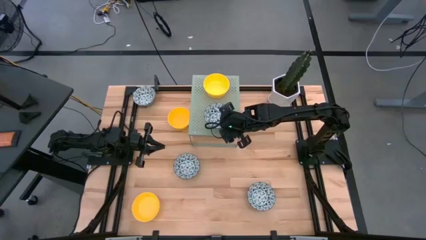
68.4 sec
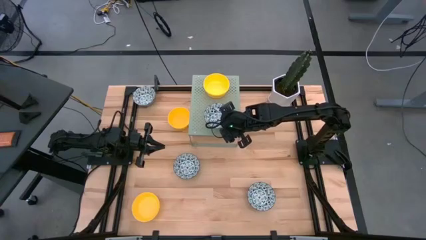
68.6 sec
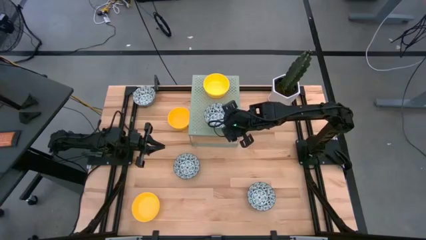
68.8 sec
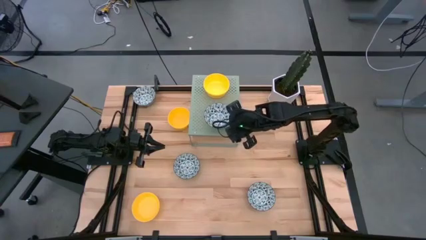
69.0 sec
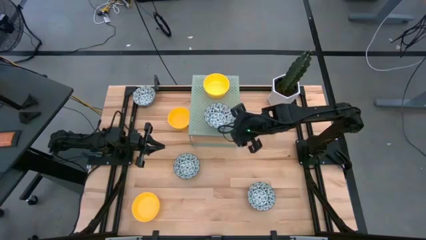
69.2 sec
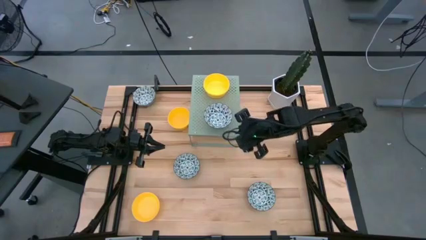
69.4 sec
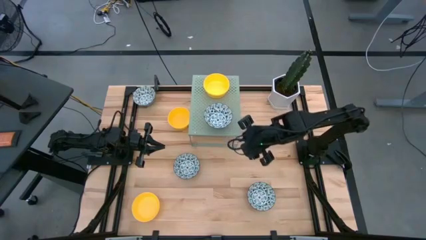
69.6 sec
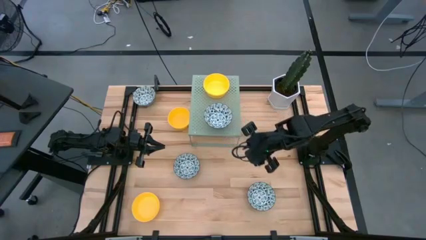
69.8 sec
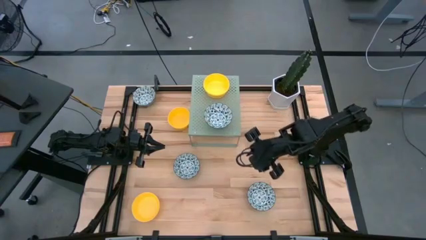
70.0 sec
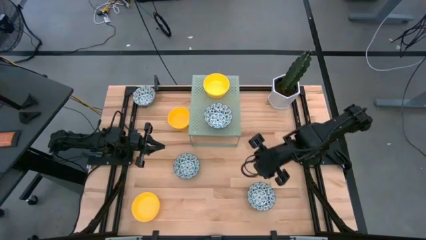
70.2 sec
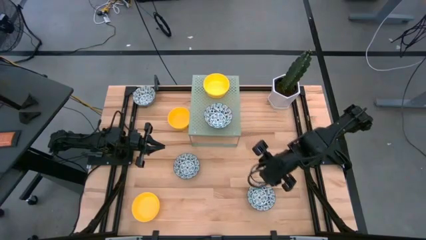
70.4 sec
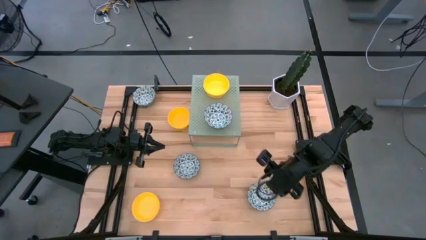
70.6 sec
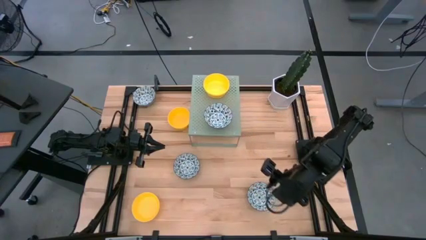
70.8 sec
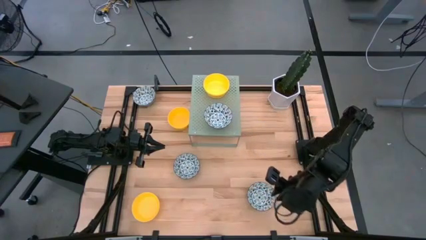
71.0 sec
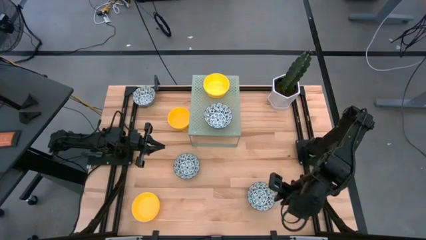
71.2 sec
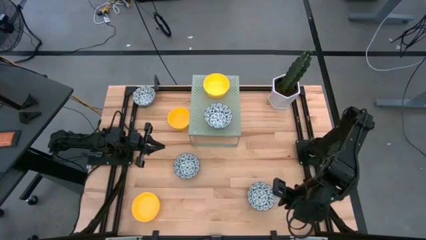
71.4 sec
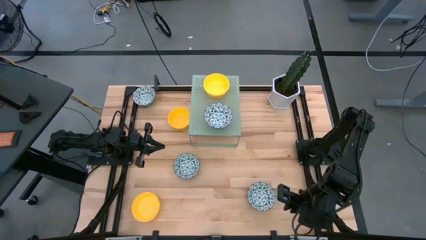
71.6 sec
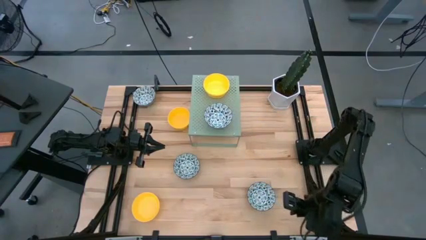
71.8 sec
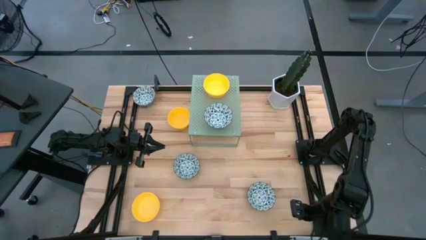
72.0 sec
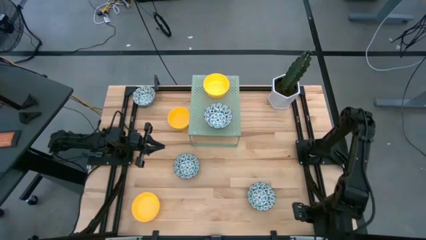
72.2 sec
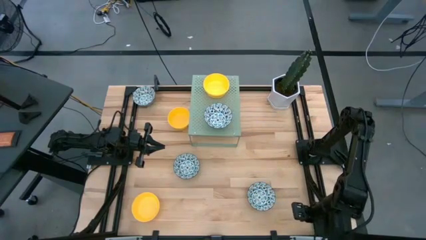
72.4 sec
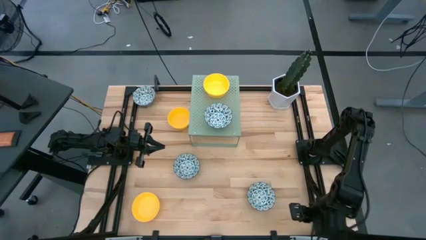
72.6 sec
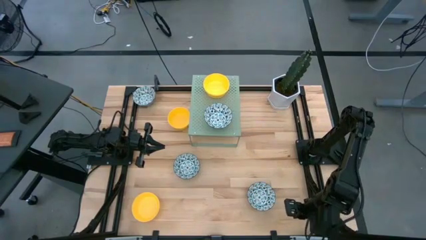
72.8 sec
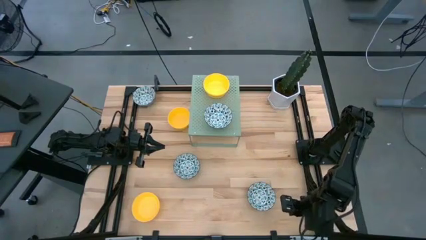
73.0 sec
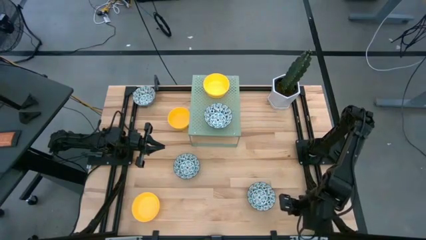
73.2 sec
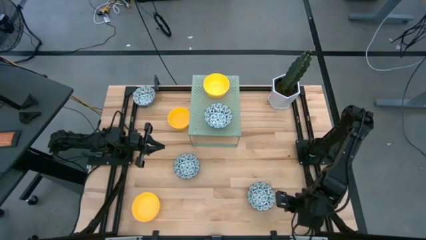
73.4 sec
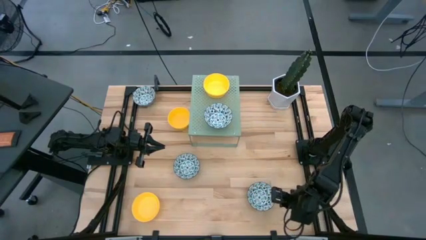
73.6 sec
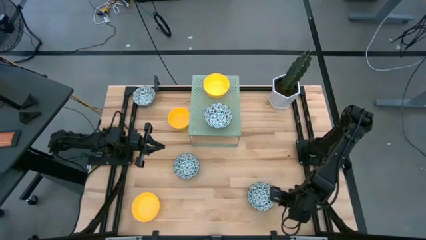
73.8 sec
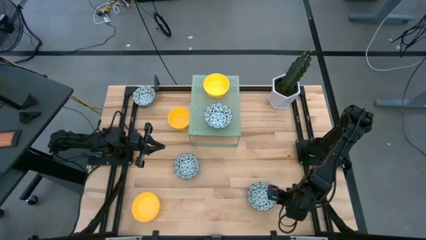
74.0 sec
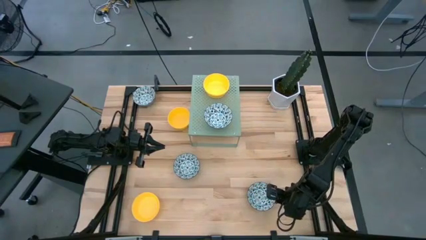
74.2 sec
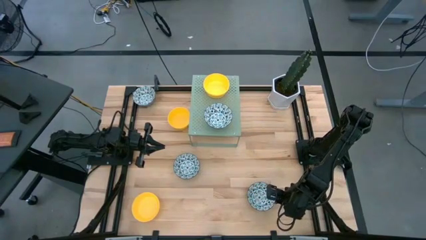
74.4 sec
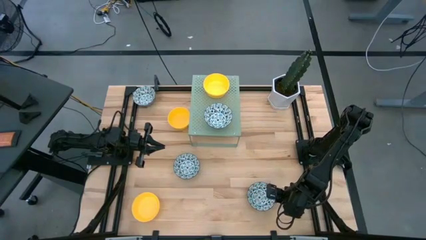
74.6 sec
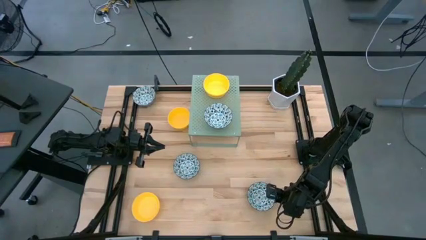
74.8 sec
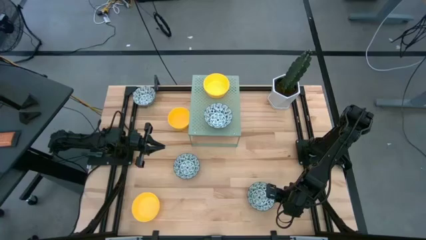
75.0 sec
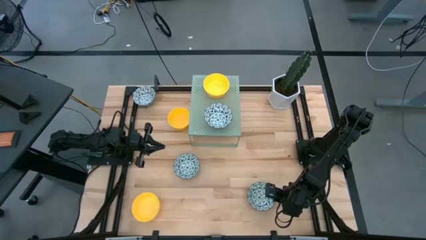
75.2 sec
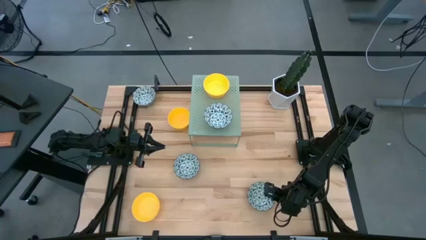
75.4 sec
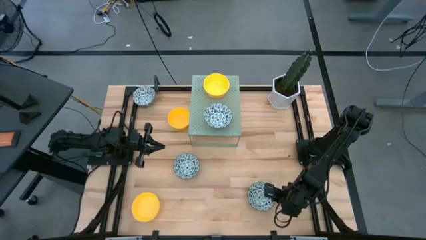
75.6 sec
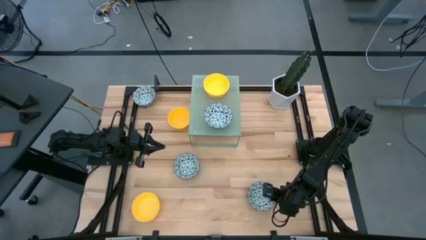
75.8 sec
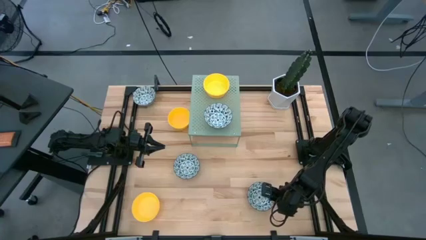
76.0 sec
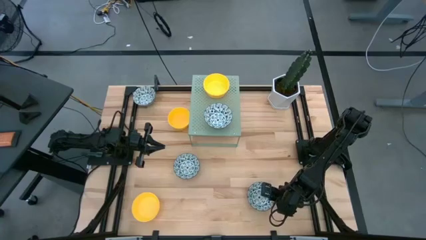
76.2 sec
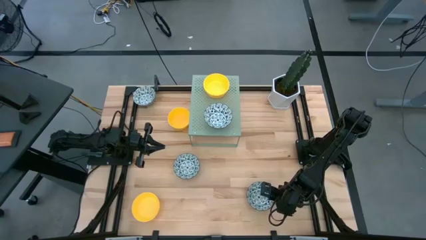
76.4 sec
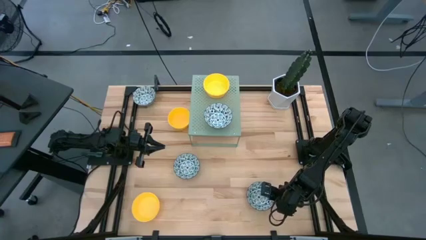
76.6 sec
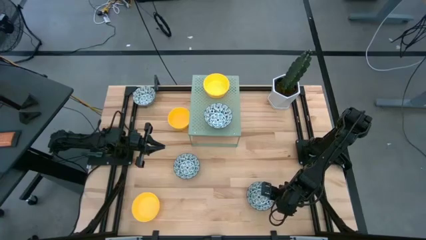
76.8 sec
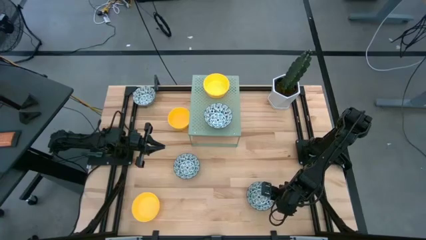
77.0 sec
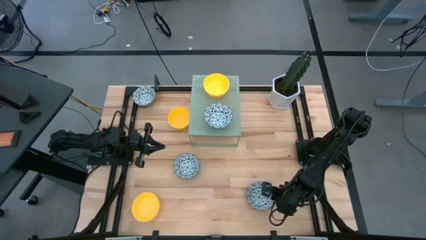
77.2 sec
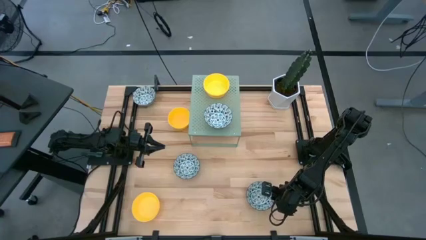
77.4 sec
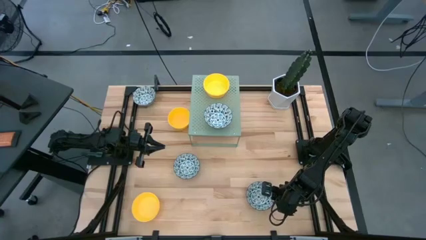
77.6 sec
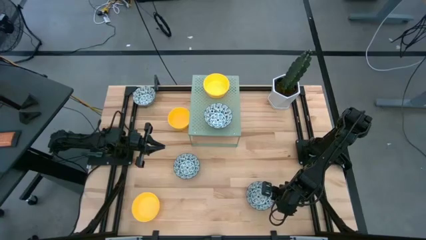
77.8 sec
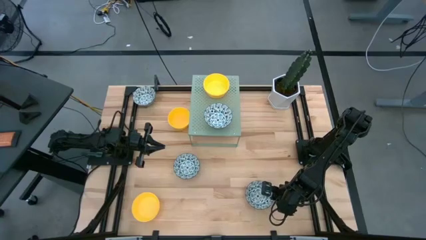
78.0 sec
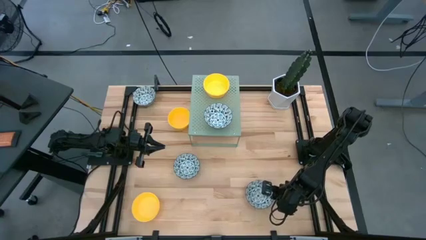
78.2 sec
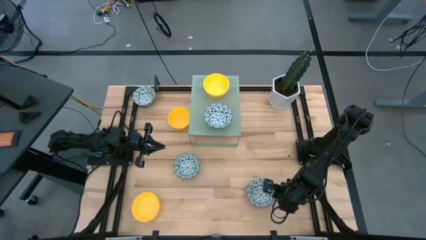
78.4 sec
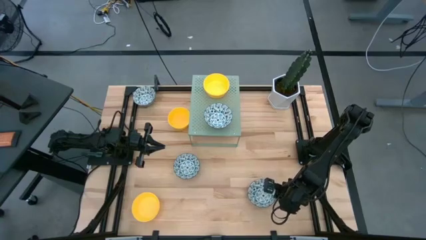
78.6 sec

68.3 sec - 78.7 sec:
Task: Pick & Place Mini bowls
Stack the blue and white bowl on top of the other blue and white bowl on the shelf
